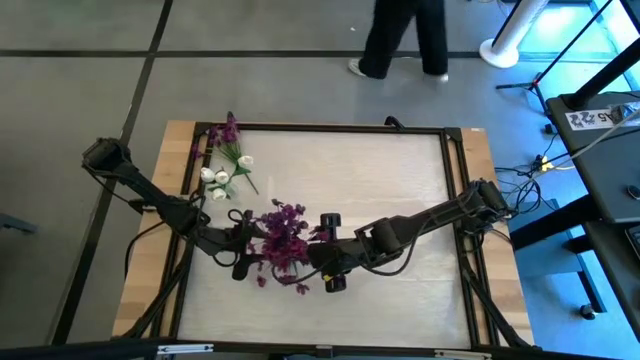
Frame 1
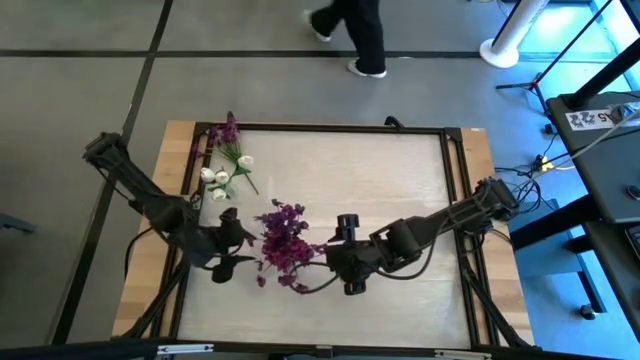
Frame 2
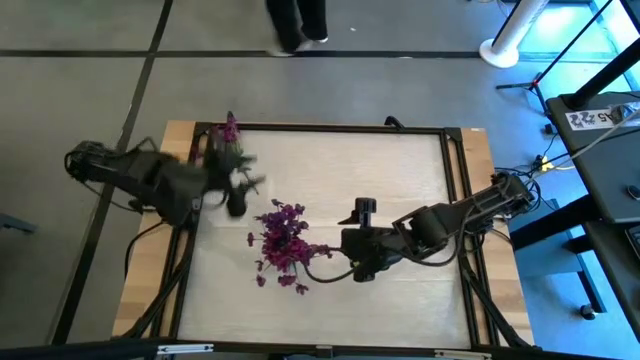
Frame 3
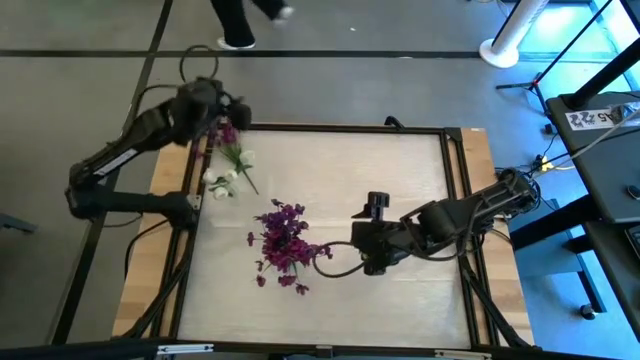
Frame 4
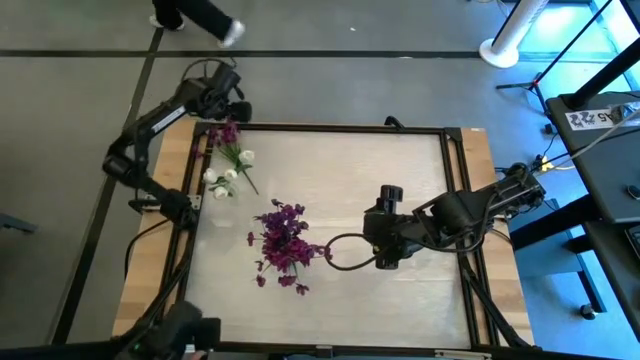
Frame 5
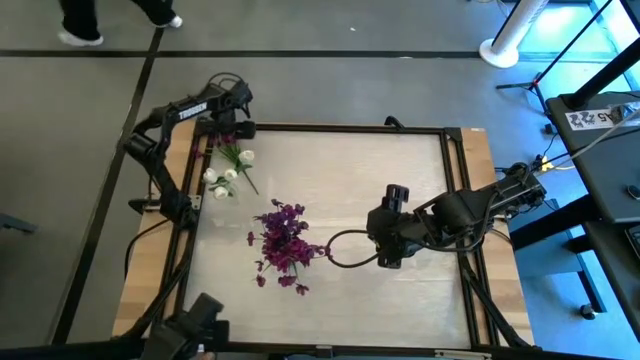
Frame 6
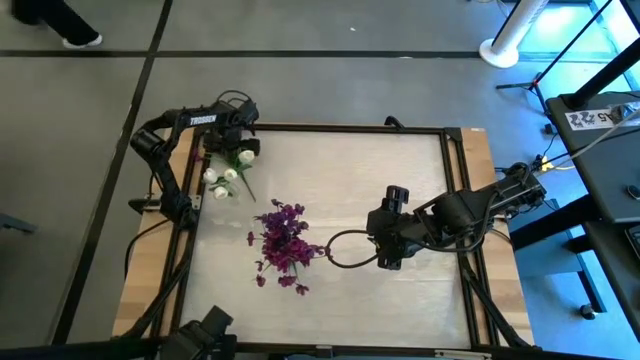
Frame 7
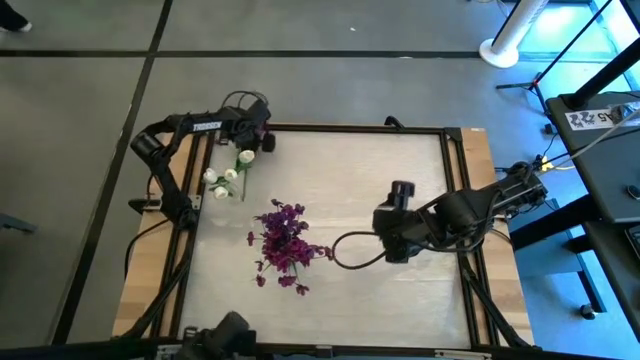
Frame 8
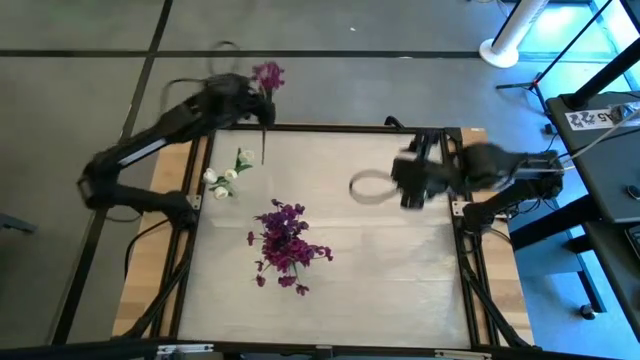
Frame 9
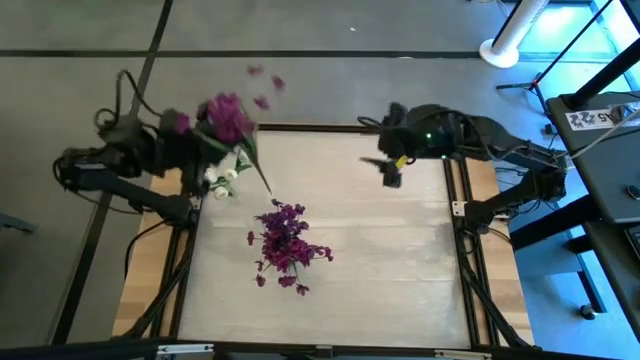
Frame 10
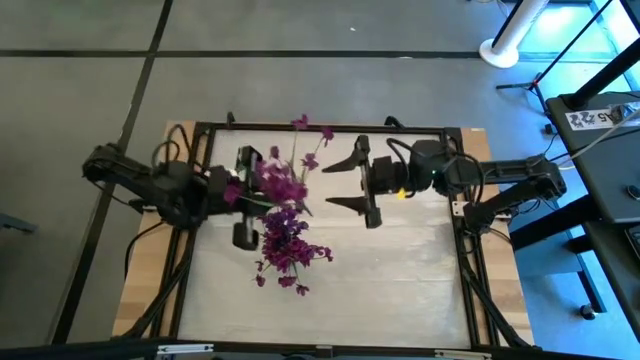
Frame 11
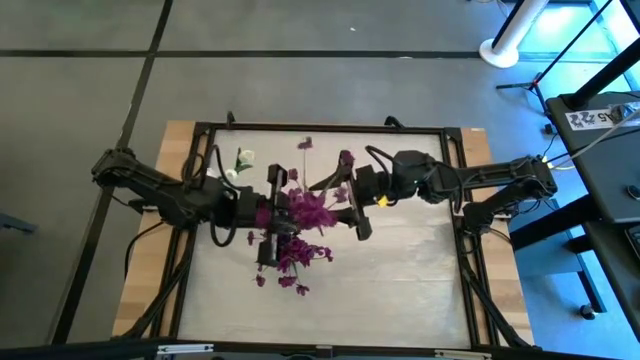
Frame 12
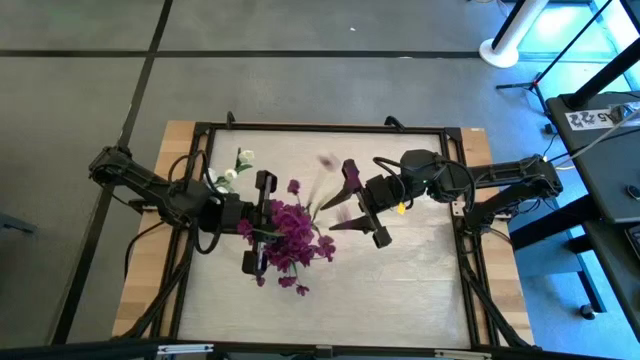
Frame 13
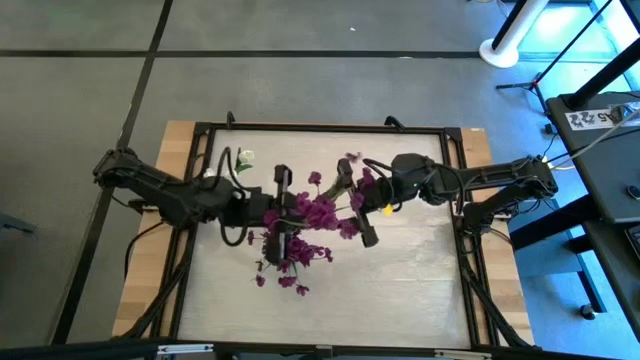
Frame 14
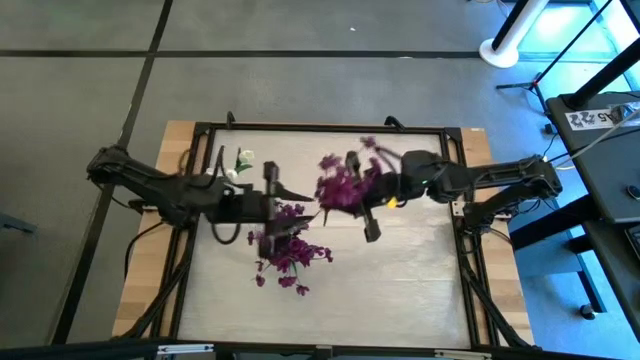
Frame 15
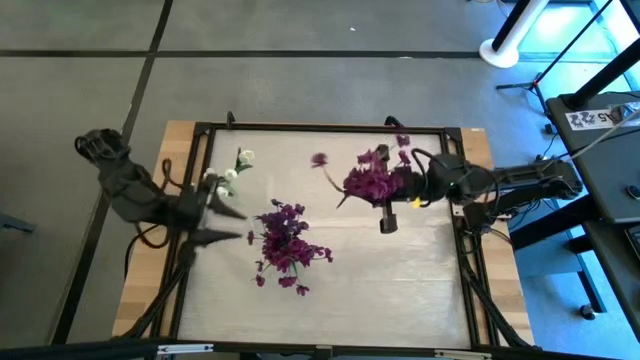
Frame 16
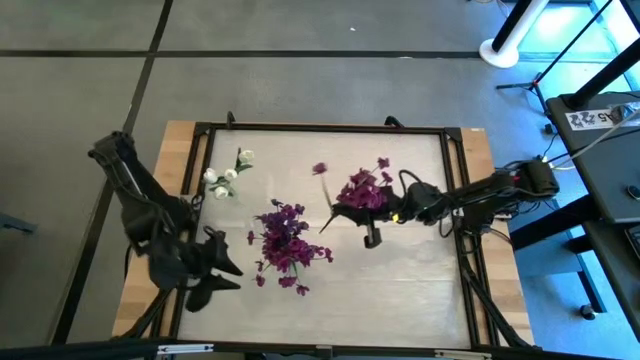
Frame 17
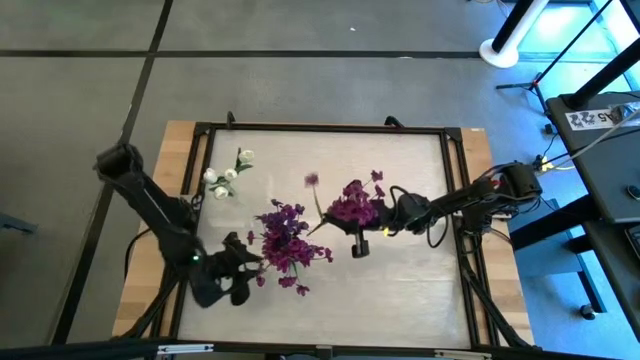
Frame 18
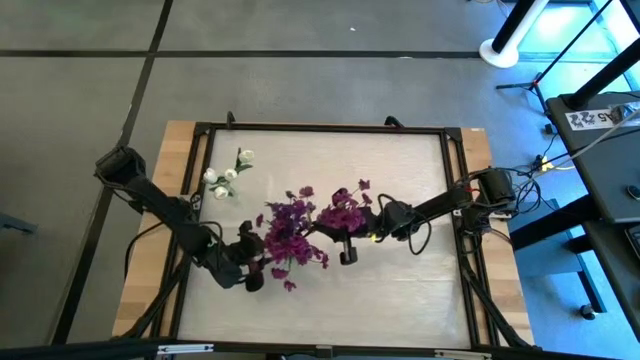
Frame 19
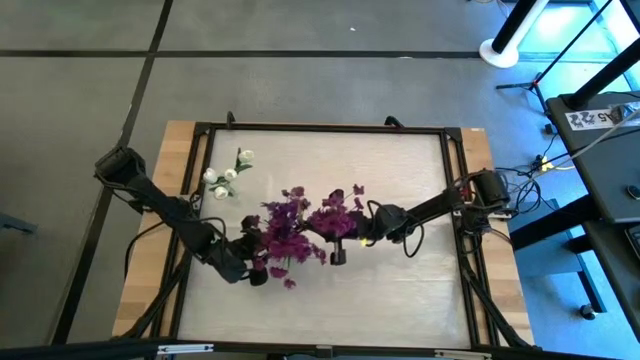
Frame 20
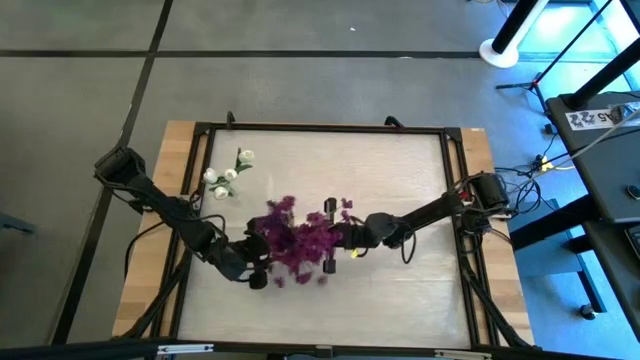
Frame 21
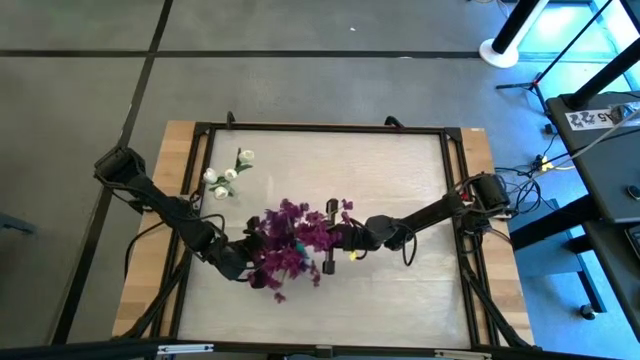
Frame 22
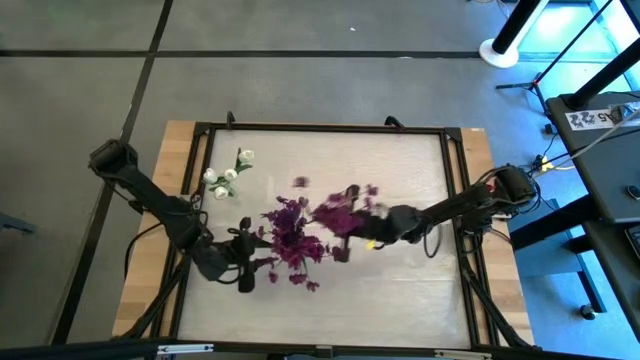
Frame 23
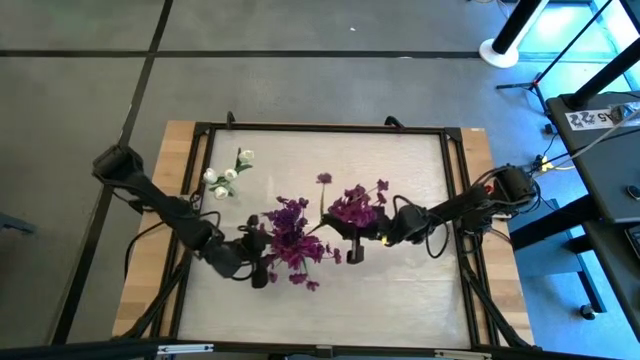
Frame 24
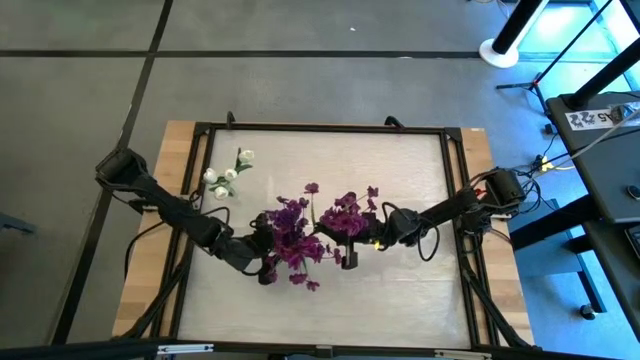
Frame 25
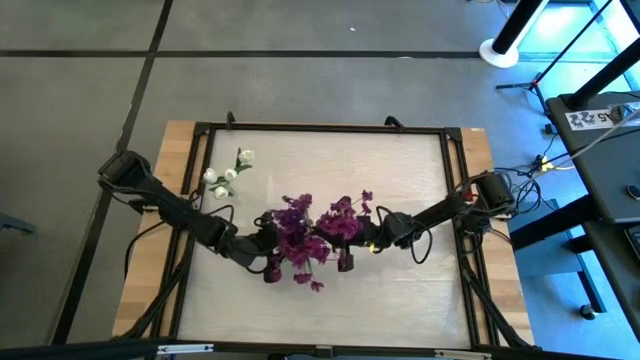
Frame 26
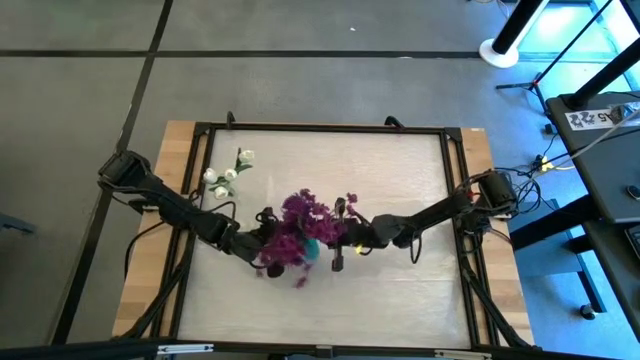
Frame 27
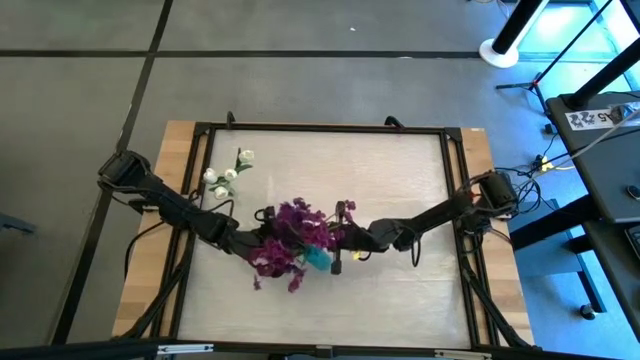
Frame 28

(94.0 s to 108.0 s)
Task: Sort flowers into vase by color
Put the violet flower into the transparent blue vase

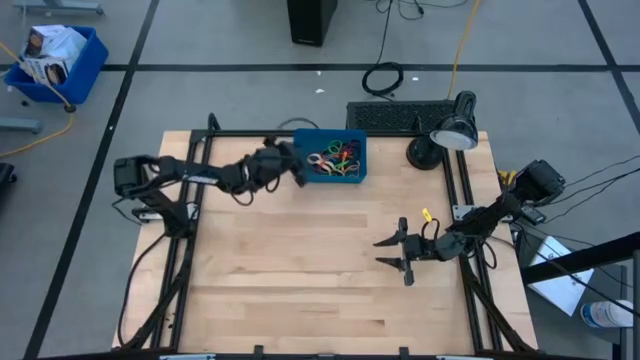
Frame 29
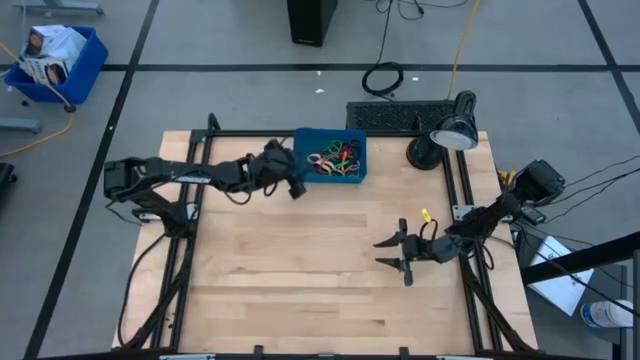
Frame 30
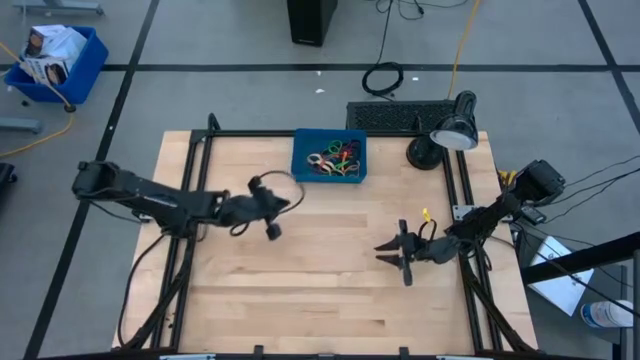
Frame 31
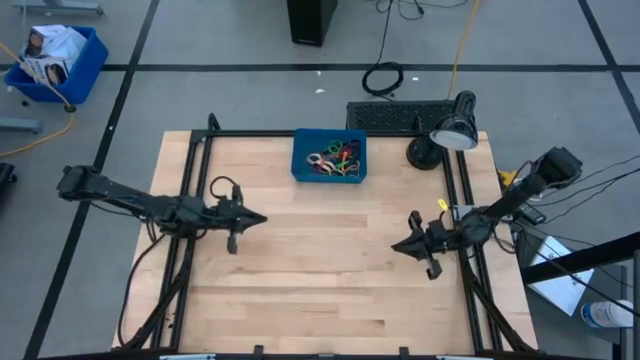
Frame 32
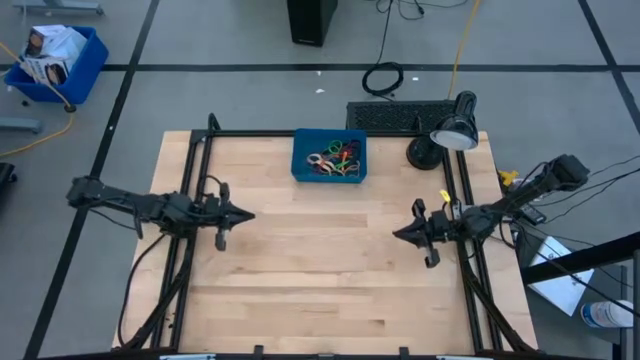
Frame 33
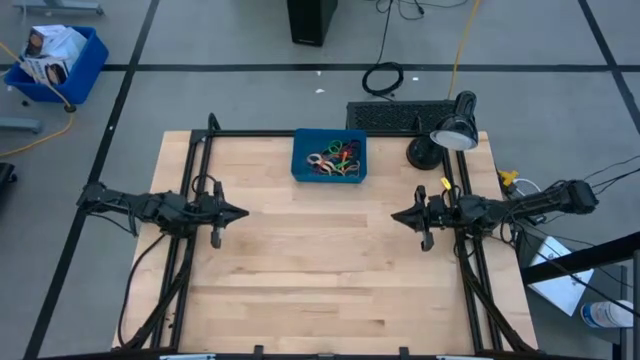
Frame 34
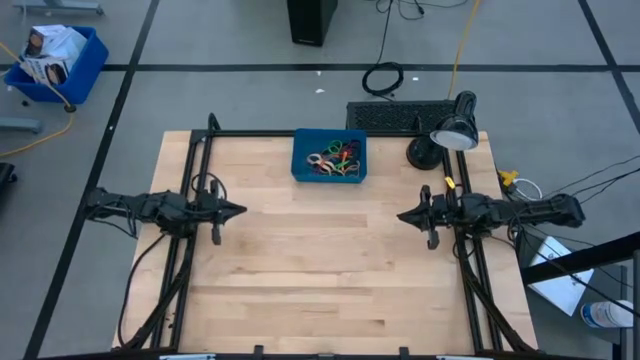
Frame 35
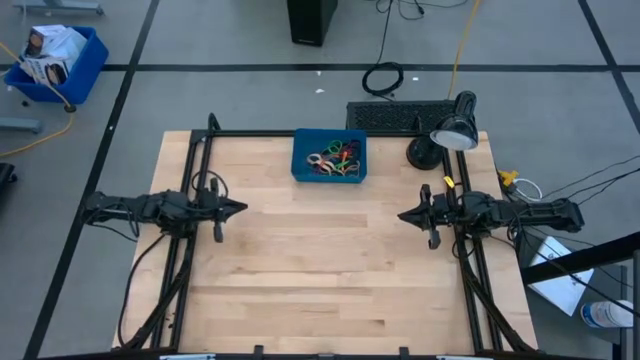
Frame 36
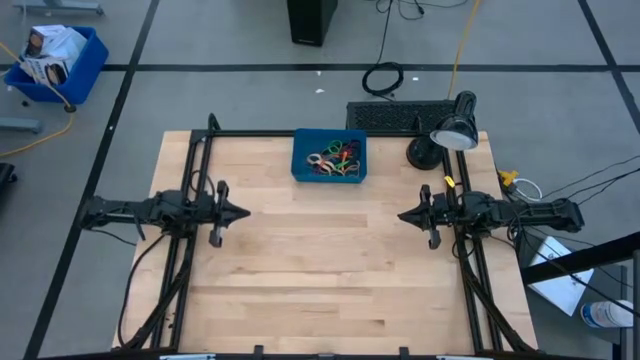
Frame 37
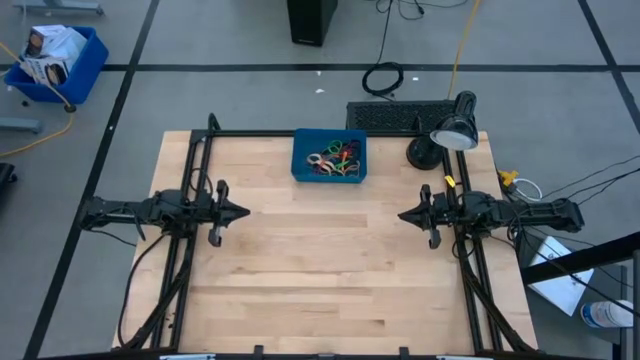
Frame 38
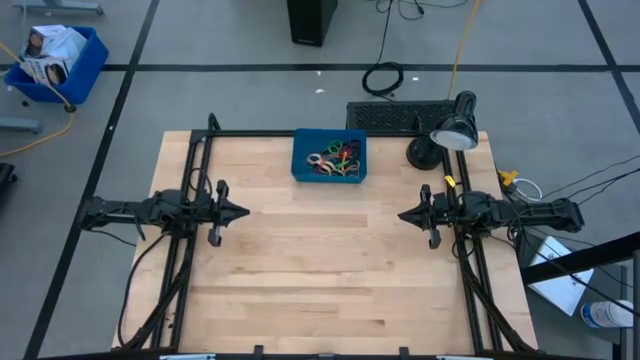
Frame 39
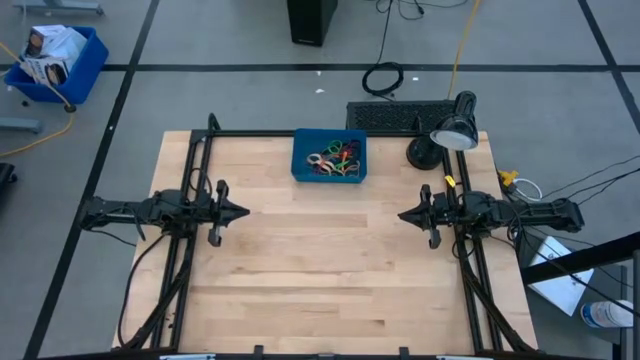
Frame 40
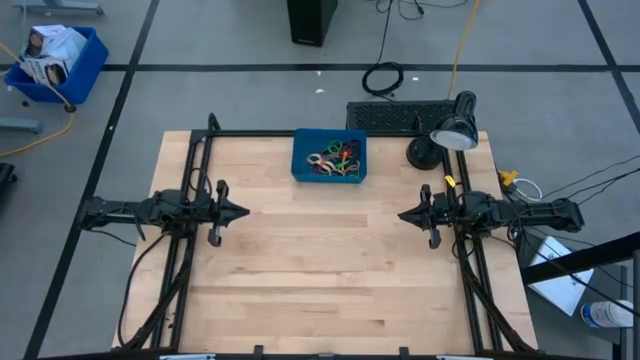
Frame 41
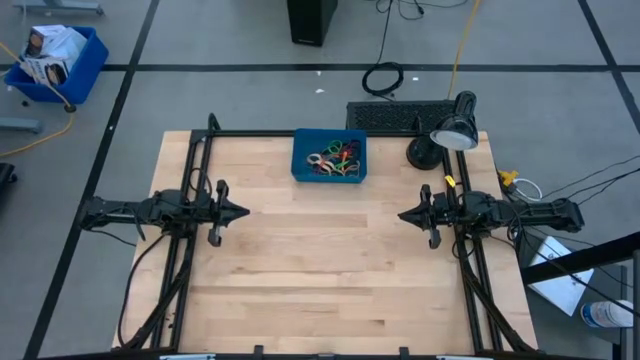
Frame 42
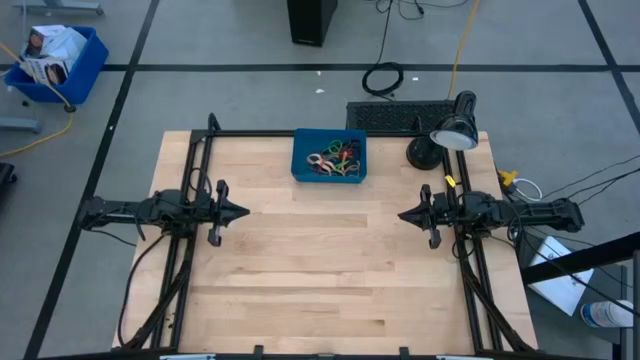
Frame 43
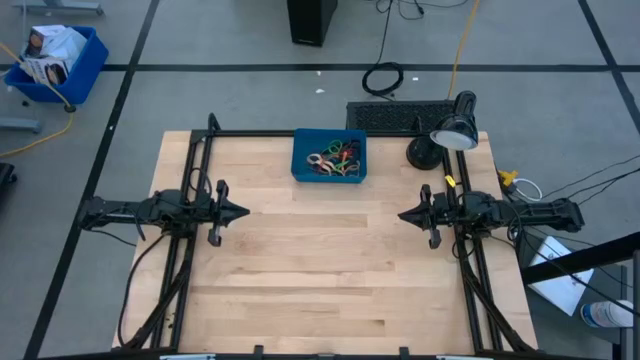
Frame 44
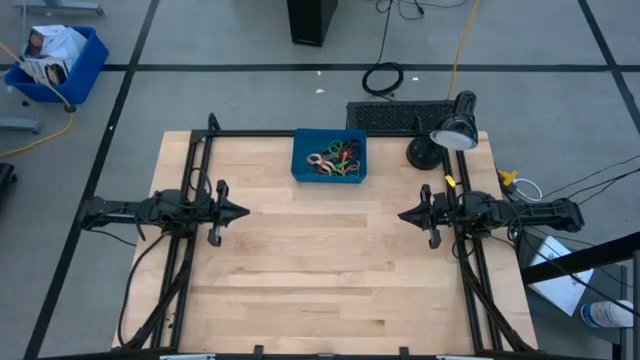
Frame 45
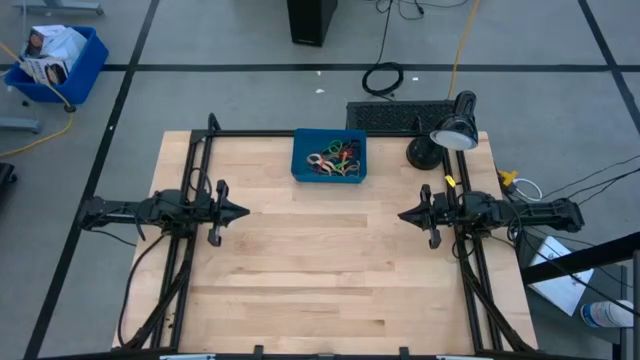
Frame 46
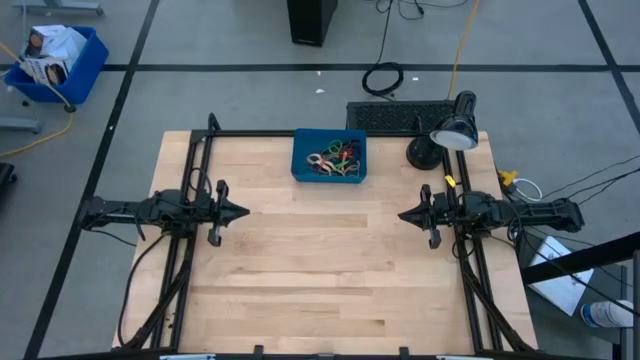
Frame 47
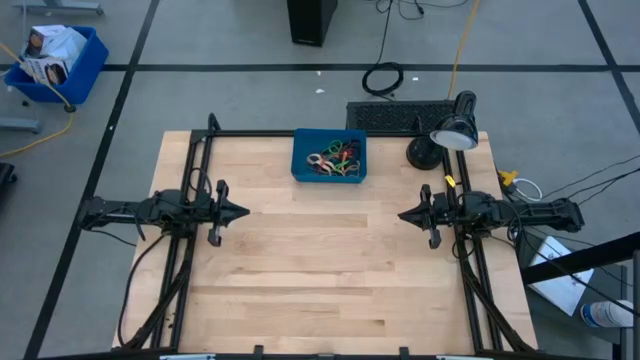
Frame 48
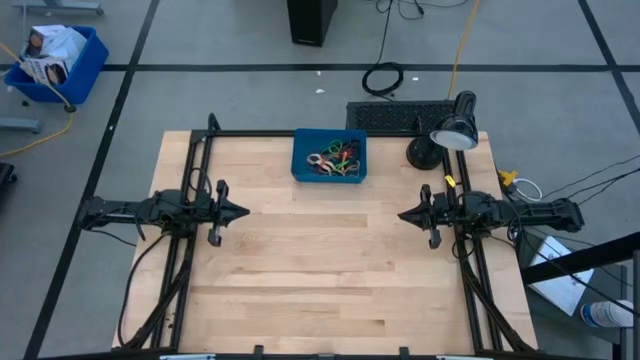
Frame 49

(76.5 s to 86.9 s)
Task: Pick and place rubber bands into bin
Return to Home Position
